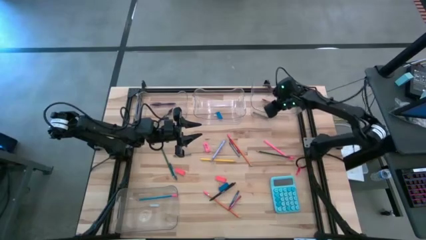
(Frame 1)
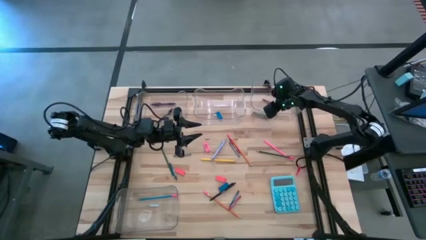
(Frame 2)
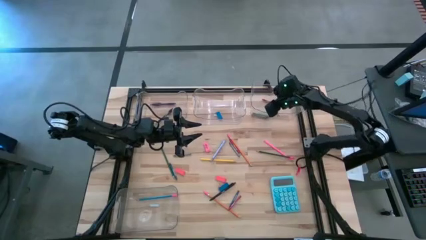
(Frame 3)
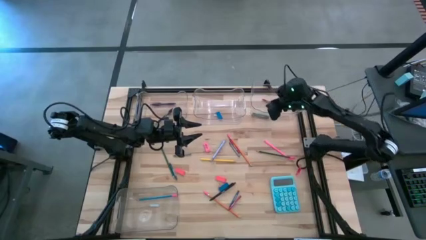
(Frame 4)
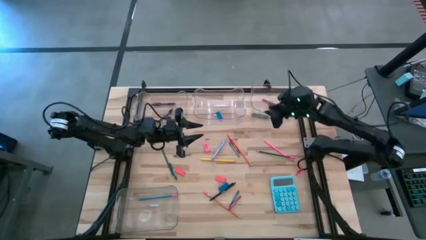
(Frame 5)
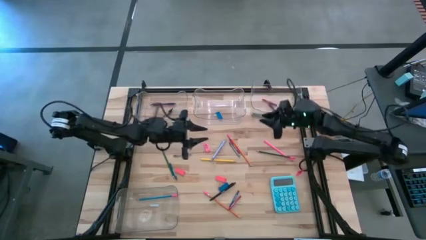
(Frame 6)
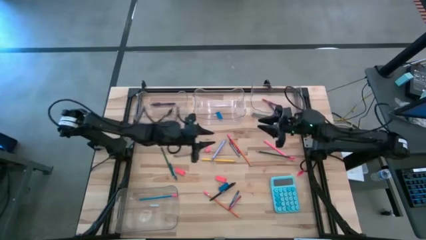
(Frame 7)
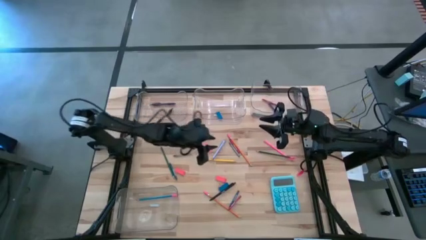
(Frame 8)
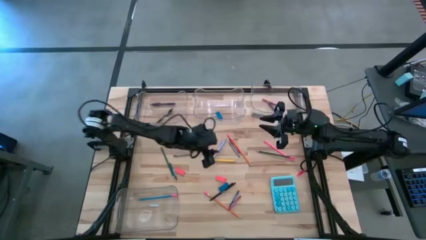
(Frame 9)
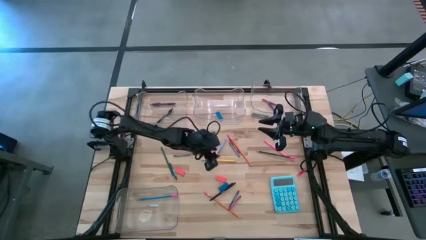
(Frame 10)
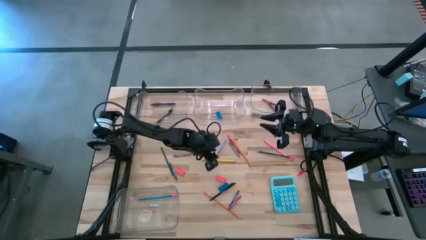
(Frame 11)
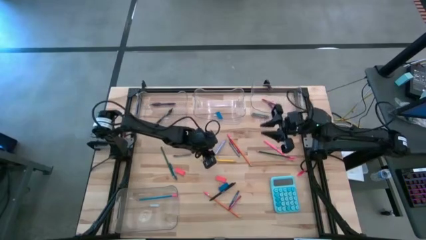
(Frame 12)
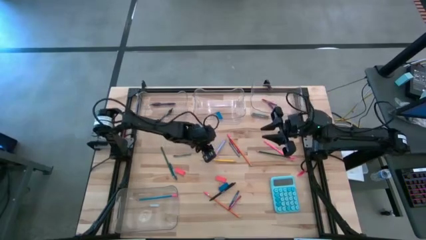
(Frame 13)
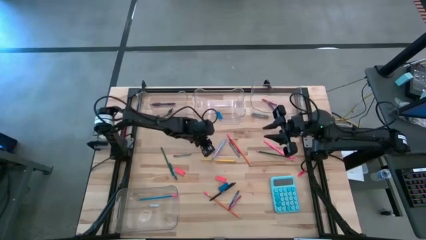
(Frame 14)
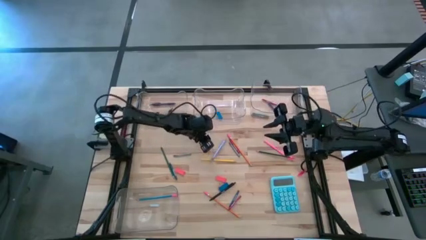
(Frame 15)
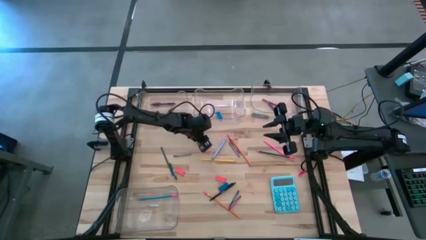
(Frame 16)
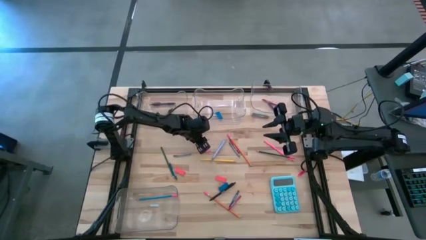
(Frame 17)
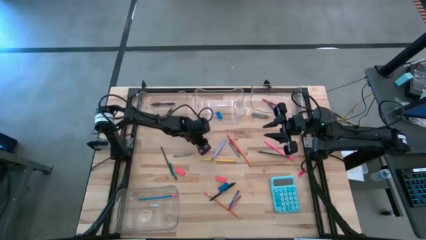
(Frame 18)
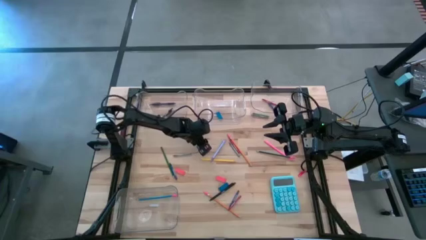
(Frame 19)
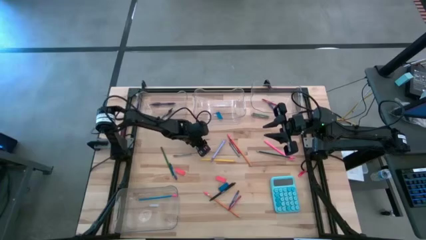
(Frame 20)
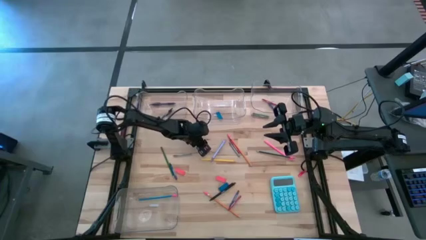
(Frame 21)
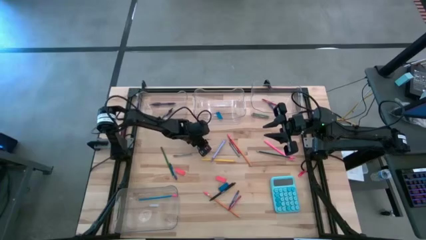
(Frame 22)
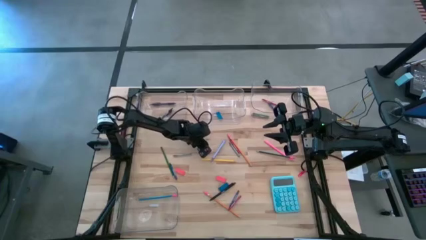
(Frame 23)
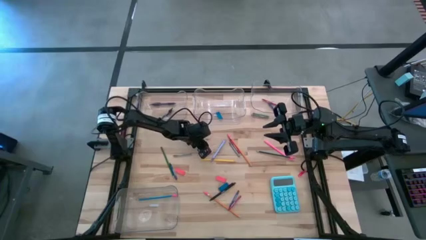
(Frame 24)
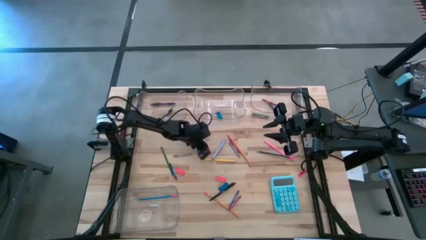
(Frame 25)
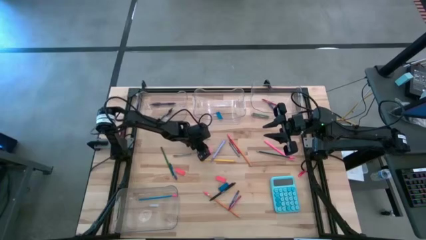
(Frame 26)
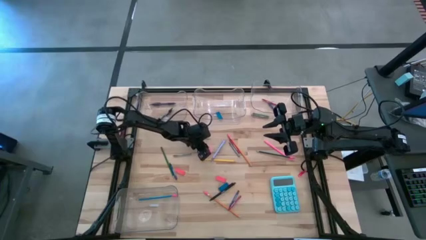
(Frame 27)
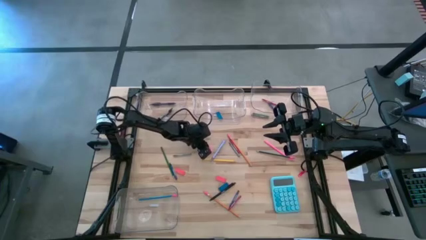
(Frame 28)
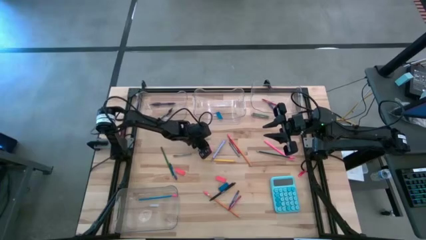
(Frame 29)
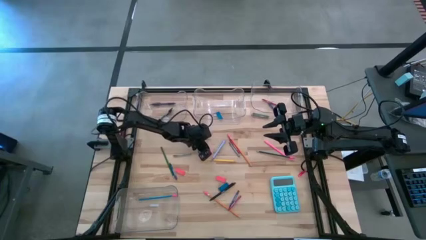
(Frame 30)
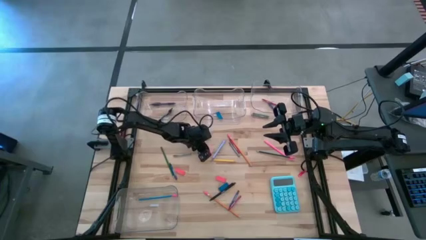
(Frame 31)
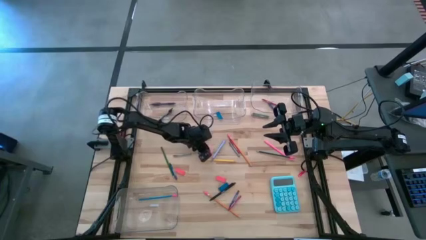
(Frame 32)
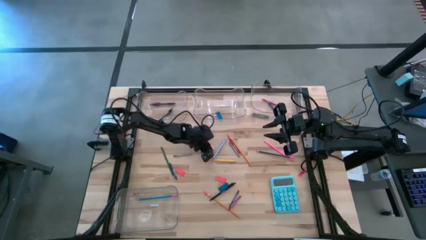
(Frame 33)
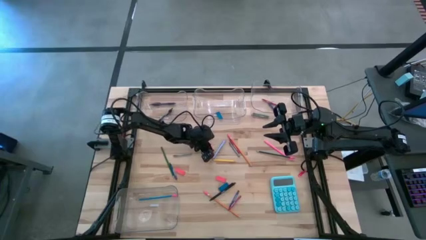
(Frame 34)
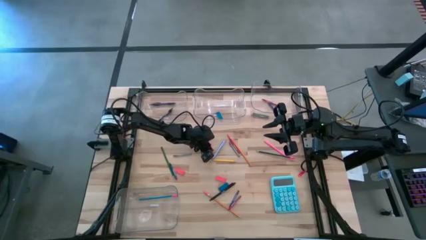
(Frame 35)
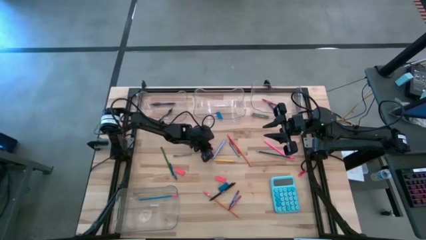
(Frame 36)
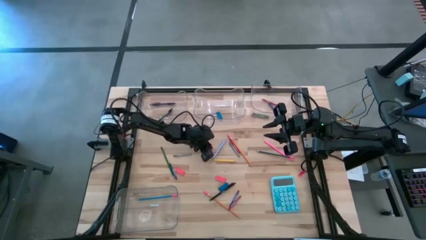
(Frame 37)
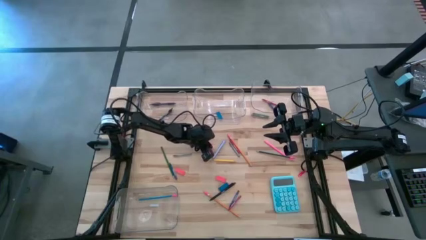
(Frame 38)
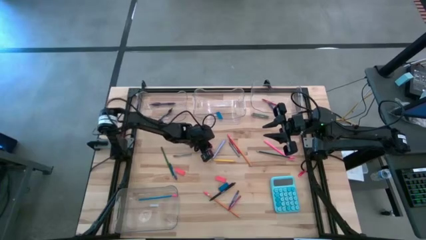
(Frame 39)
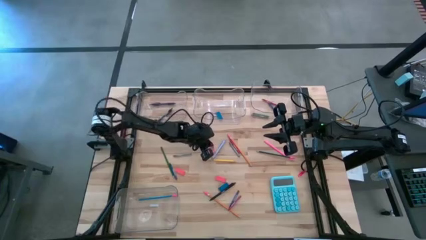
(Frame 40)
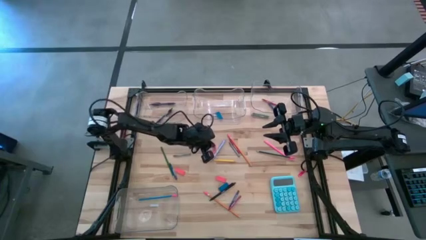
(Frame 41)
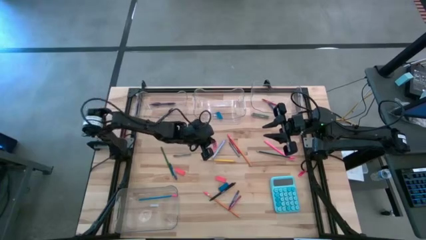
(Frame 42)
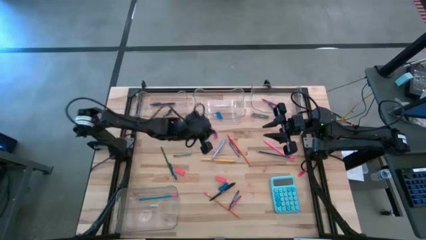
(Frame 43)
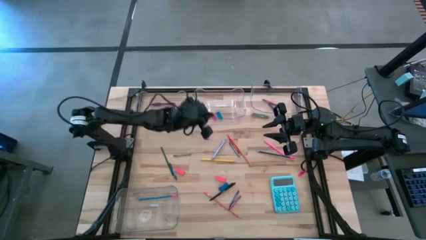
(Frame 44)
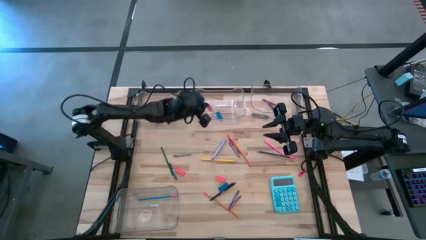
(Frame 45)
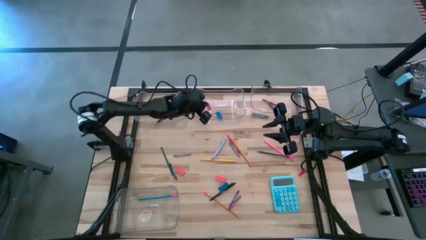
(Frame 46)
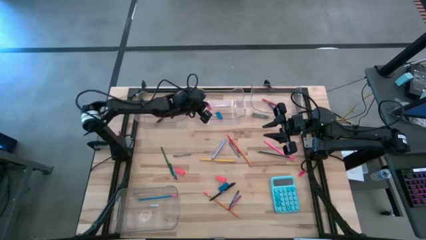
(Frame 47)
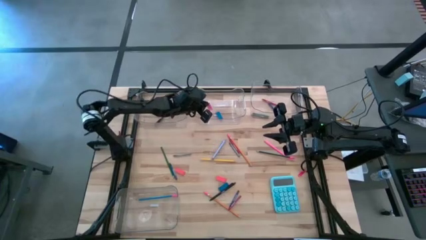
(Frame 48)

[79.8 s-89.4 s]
Task: Sort crayons/erasers/pens/pencils in bins
Put the pink eraser into the top middle transparent bin

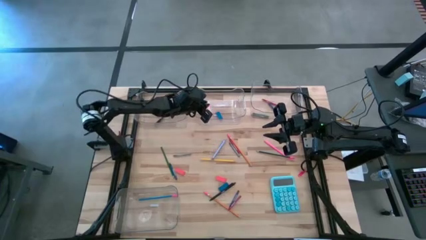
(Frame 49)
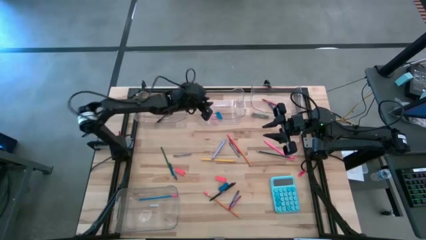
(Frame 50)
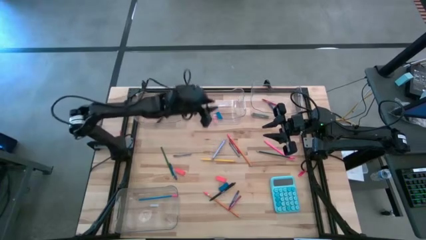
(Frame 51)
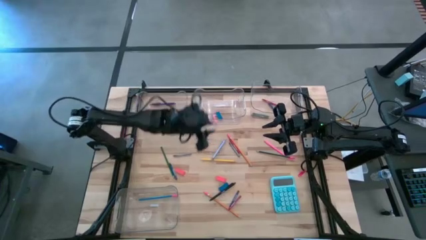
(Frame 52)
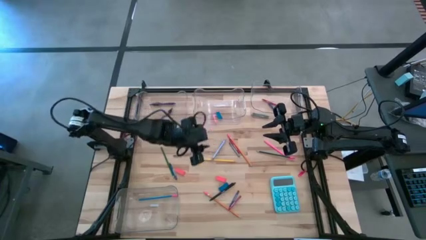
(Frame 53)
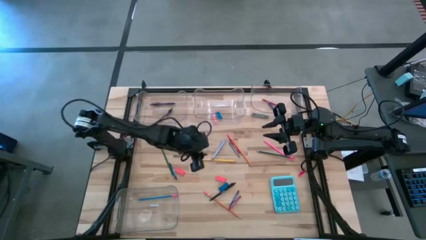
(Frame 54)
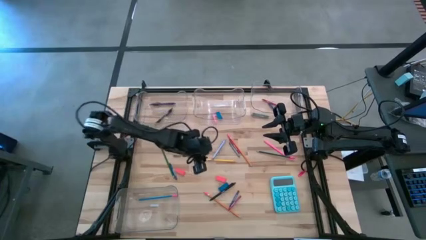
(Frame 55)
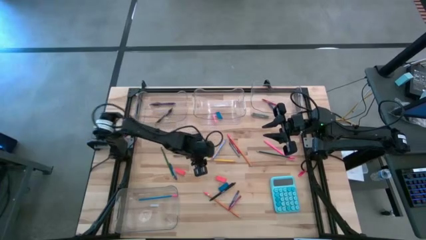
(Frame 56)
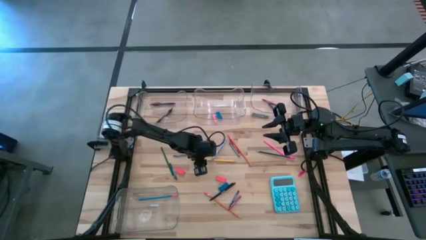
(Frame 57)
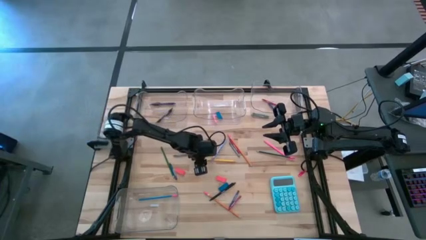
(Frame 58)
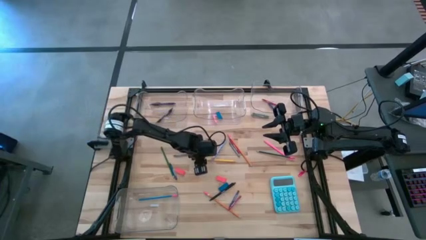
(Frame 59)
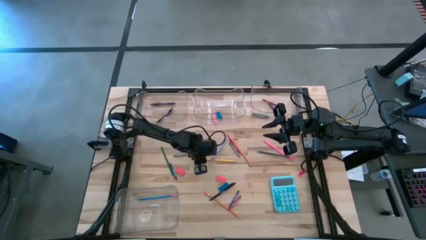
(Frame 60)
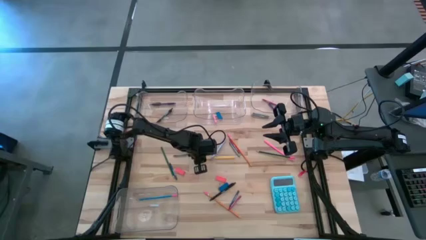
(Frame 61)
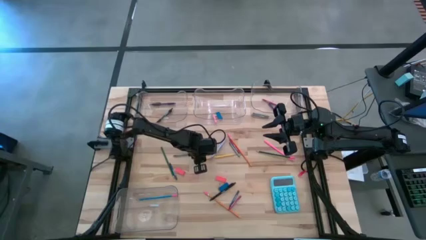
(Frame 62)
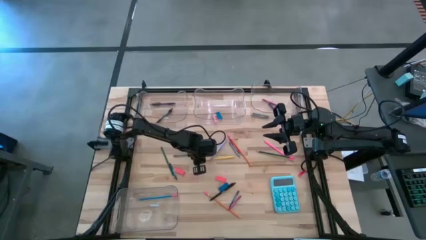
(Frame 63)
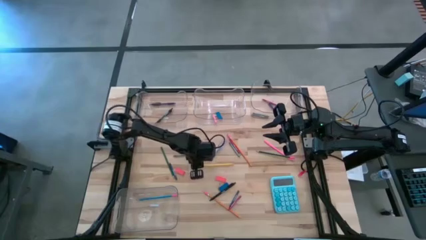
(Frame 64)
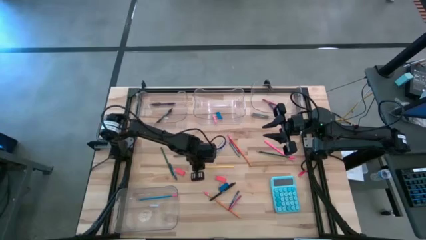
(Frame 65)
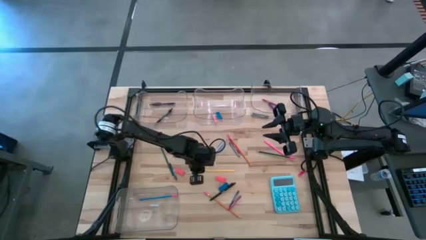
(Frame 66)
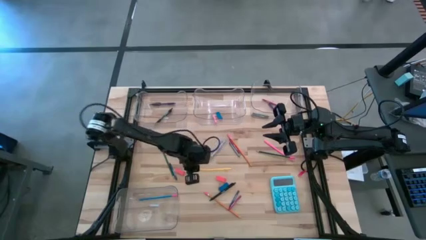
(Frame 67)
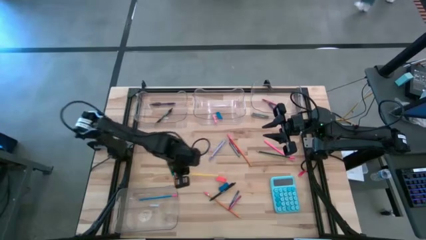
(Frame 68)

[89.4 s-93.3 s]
Put the yellow pencil into the bottom transparent bin

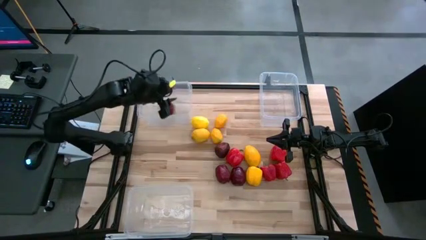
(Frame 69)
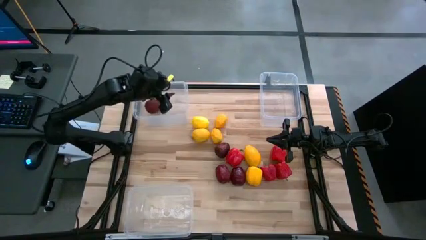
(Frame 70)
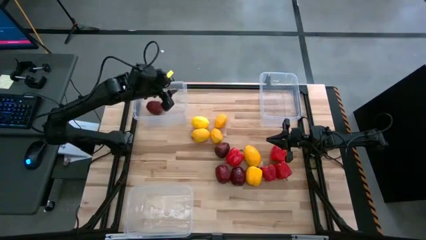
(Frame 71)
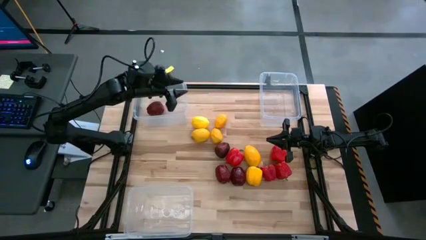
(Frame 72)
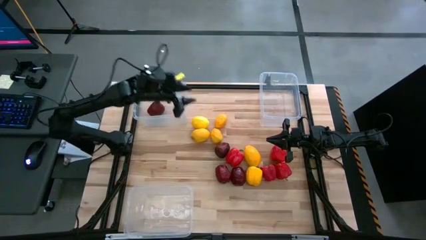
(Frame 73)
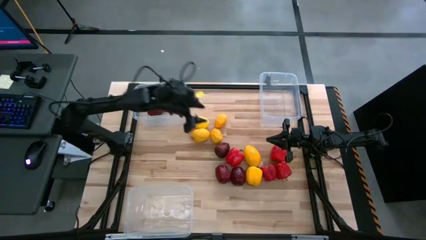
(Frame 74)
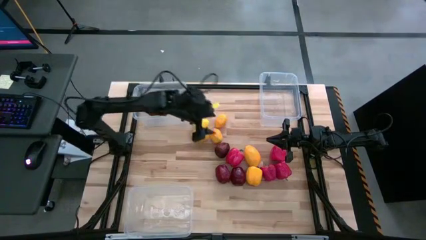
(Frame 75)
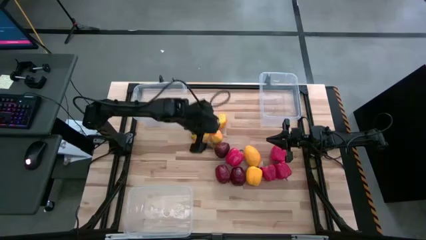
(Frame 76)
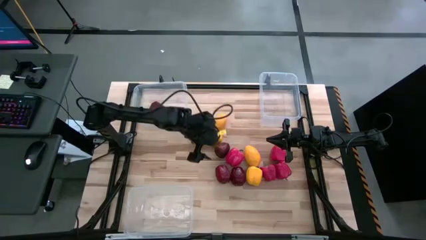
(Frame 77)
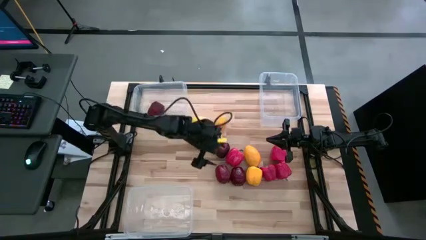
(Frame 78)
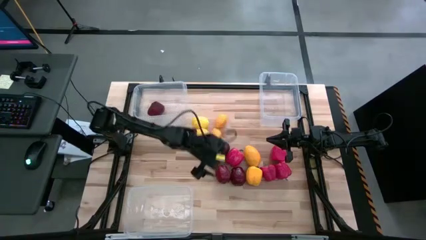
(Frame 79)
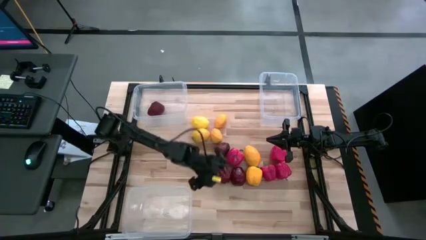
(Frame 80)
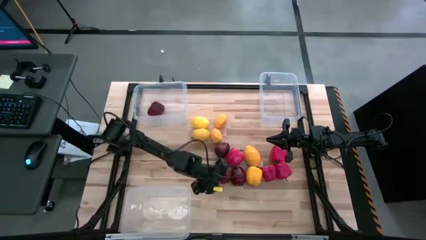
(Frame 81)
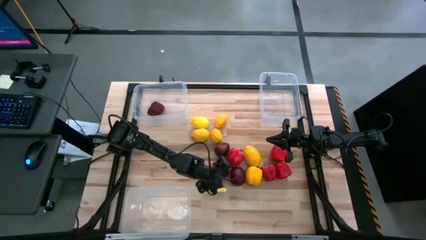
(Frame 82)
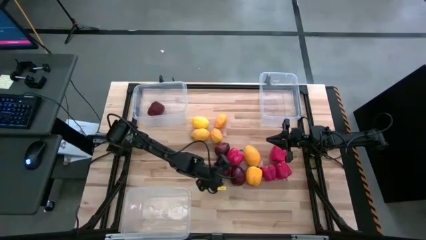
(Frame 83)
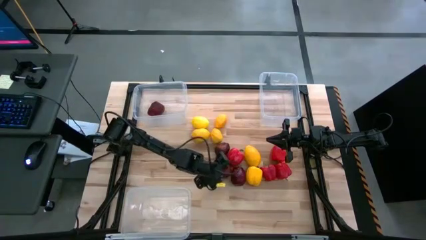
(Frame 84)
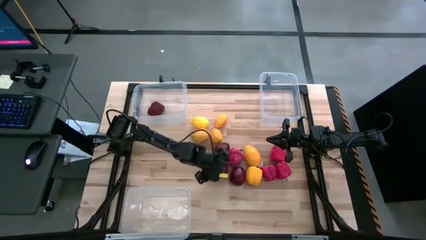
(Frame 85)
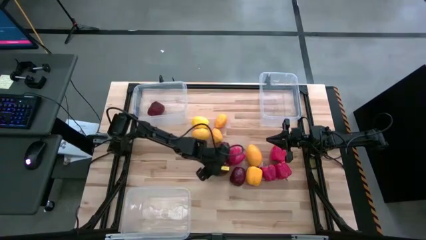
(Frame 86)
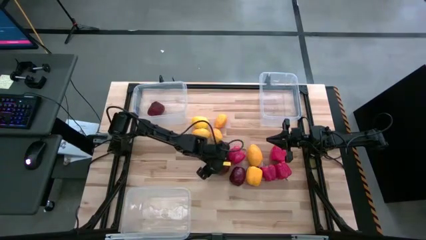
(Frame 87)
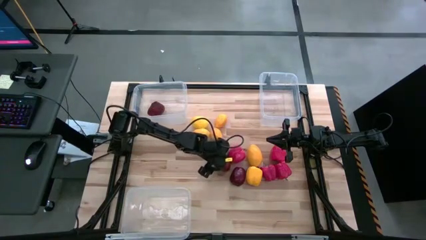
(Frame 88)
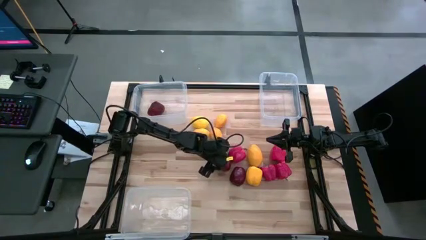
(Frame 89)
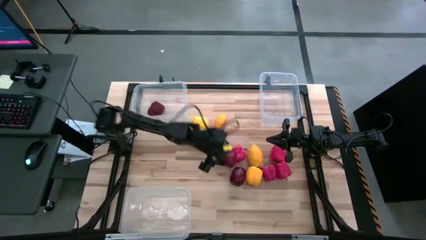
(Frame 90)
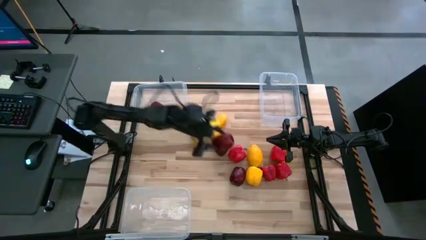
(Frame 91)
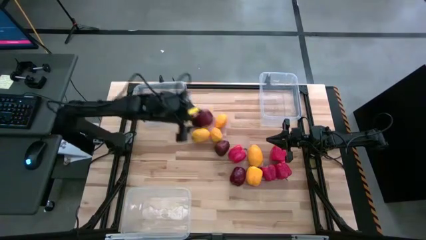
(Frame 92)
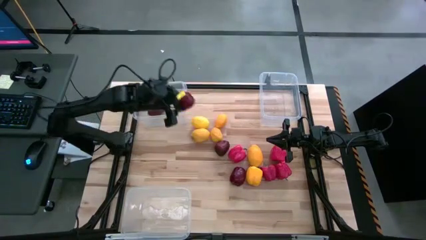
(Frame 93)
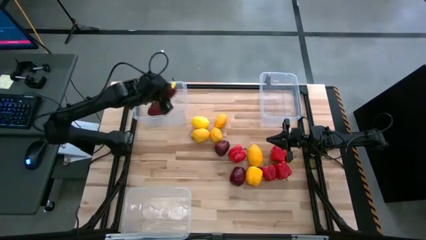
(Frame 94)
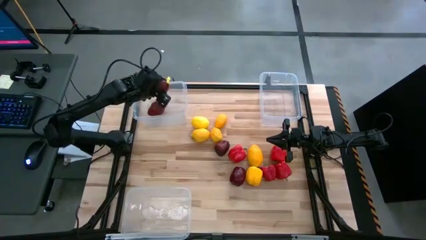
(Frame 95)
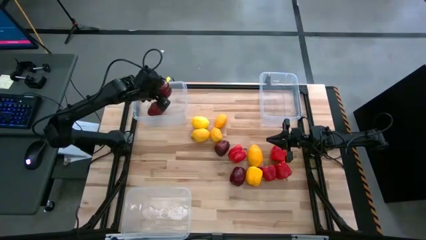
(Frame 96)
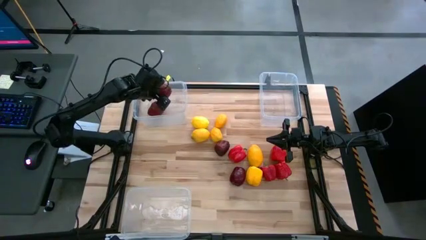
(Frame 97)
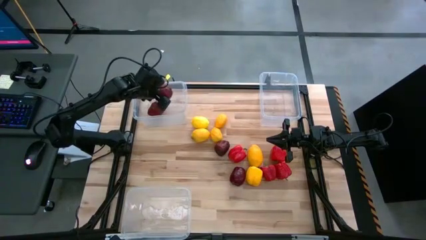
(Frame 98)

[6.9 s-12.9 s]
Task: Sort produce into baskets
Put the red apple into the top-left transparent bin
